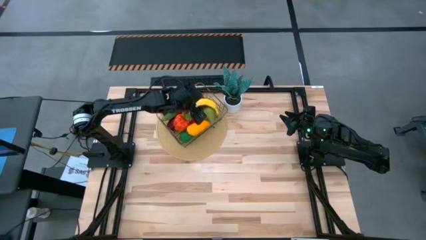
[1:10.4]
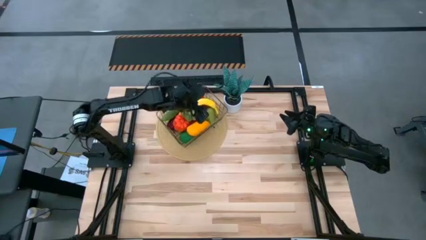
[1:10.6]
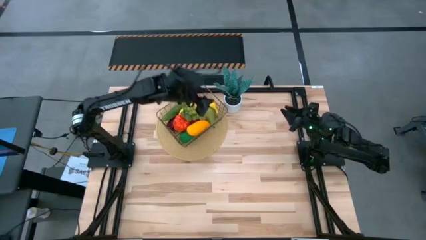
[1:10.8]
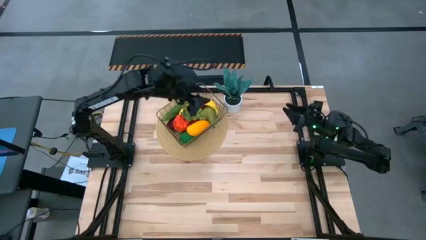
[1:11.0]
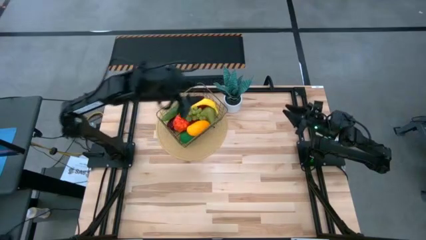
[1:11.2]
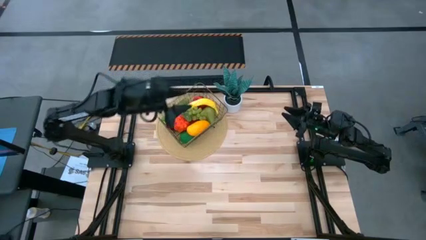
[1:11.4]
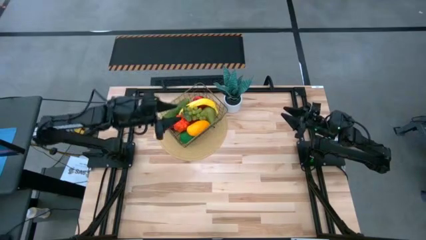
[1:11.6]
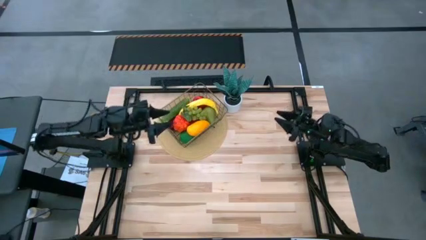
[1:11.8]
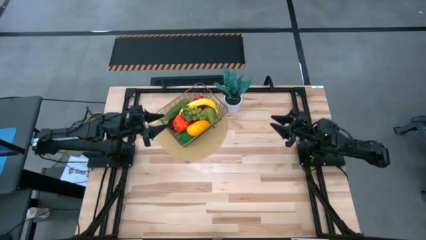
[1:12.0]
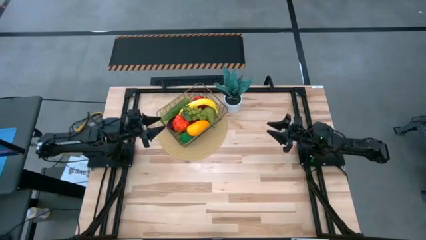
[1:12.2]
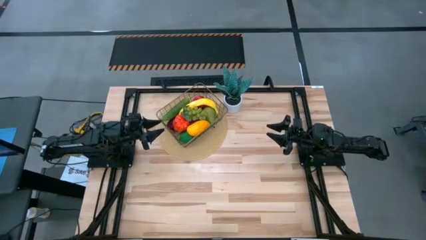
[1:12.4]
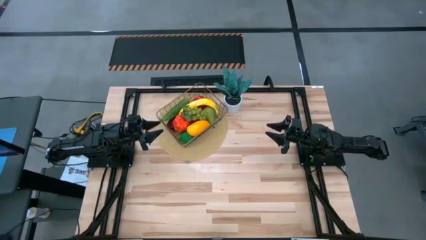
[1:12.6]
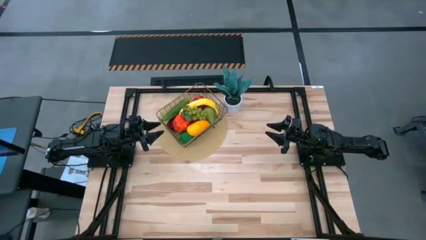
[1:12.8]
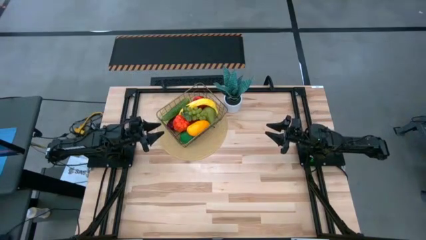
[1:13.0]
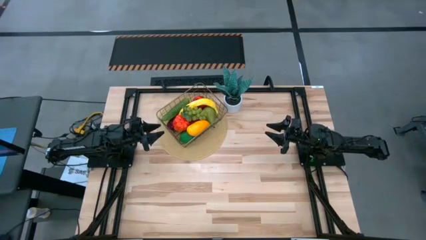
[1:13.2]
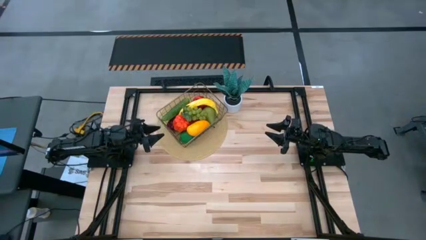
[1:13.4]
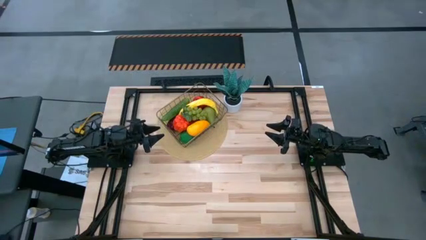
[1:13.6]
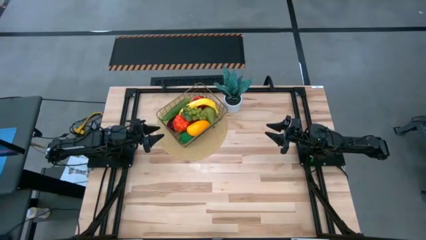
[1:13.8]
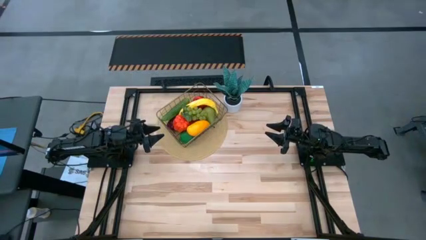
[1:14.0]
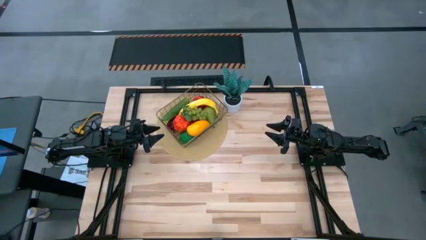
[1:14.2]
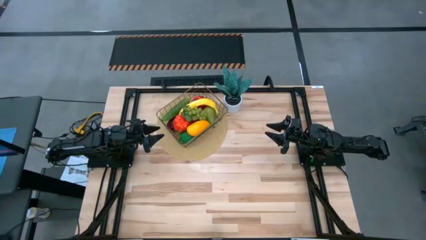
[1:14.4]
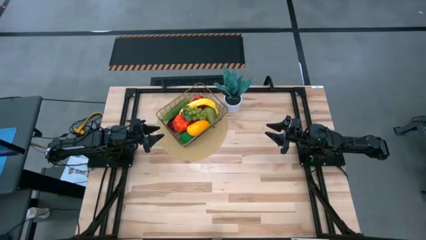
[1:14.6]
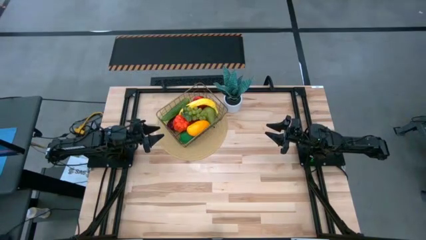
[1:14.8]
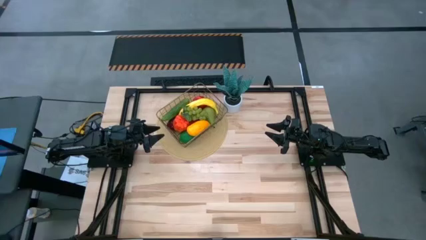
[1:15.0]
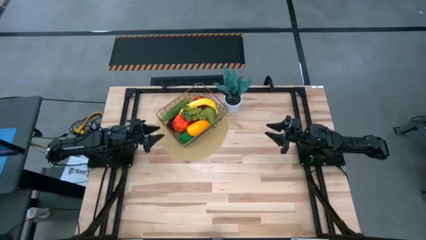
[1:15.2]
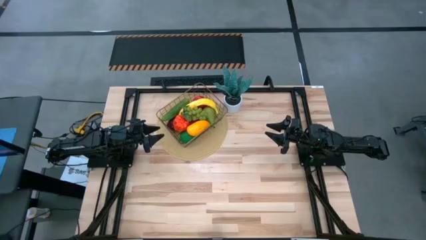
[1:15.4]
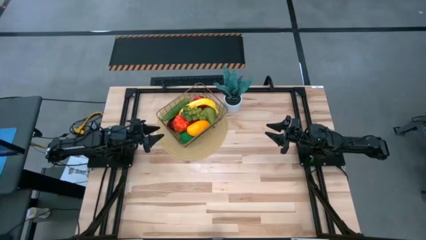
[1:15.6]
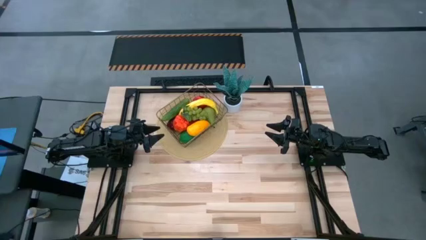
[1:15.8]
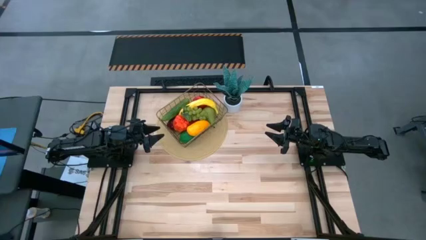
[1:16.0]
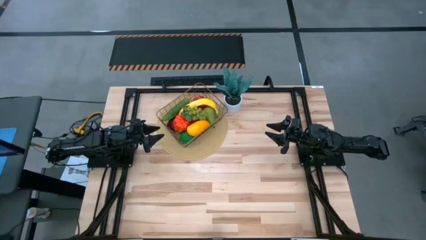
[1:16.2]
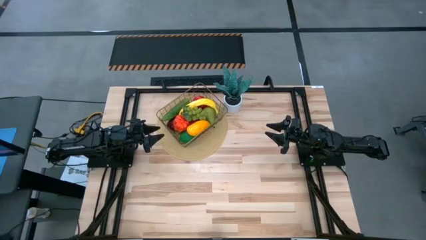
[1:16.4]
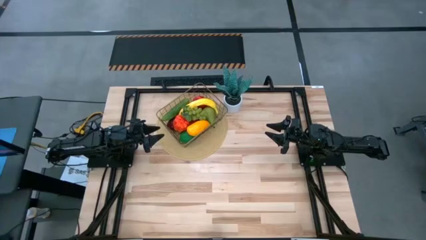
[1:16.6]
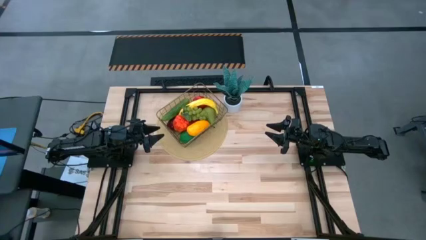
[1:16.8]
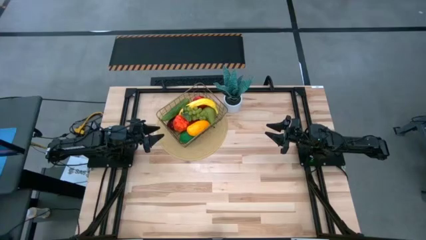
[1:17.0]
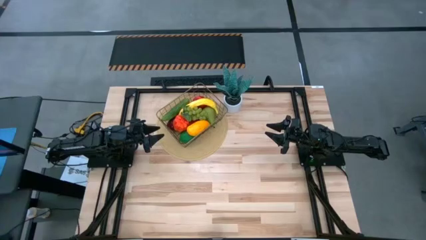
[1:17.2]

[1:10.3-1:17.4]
Task: Build produce basket
Return to Home Position

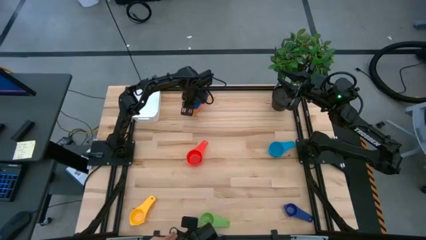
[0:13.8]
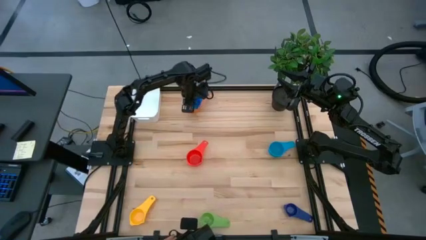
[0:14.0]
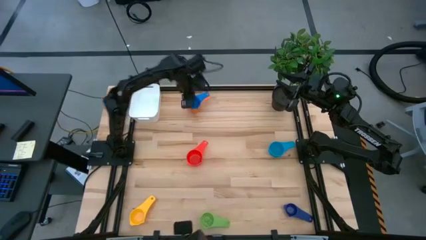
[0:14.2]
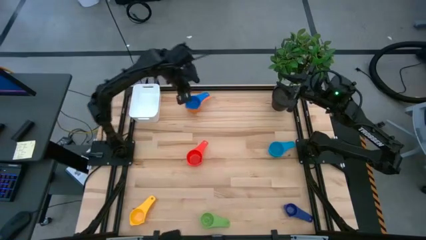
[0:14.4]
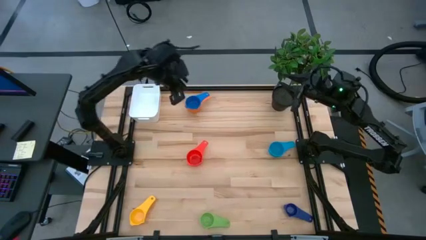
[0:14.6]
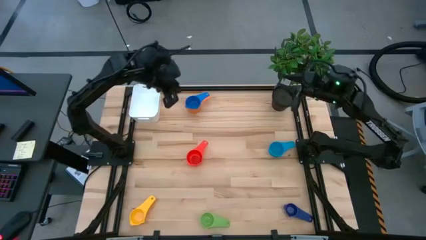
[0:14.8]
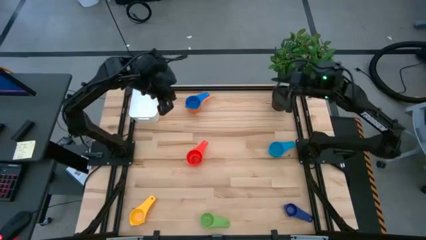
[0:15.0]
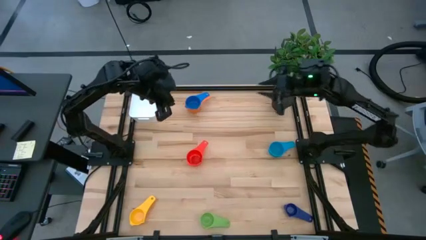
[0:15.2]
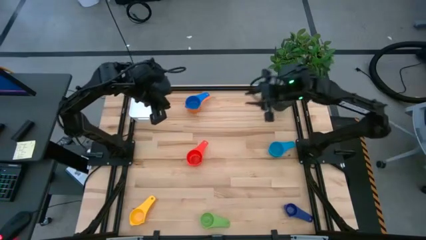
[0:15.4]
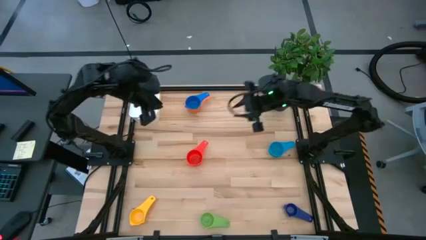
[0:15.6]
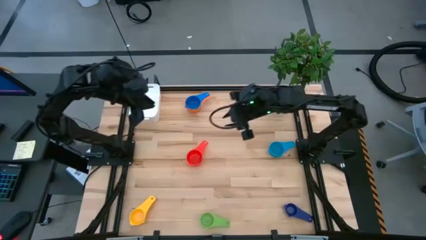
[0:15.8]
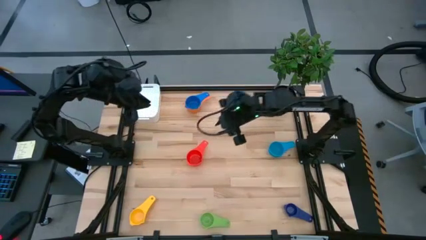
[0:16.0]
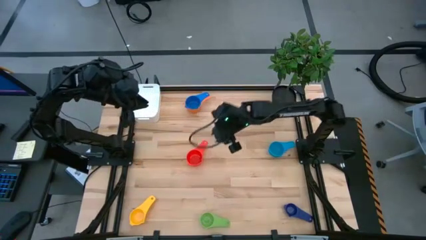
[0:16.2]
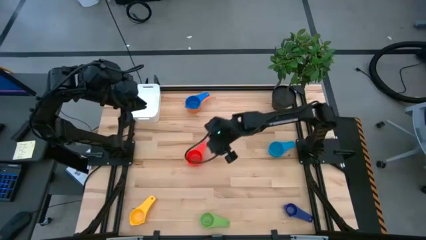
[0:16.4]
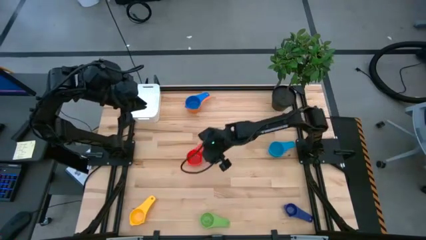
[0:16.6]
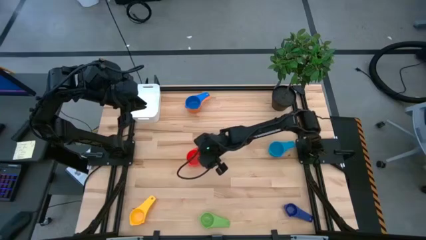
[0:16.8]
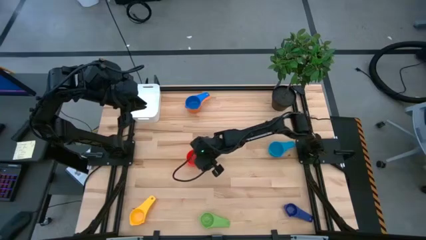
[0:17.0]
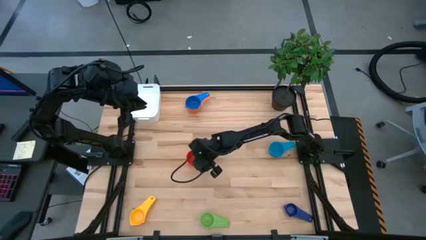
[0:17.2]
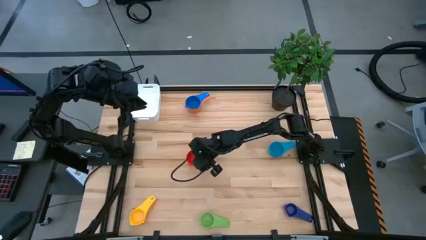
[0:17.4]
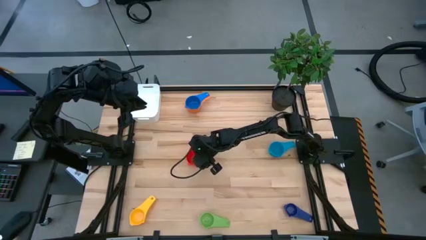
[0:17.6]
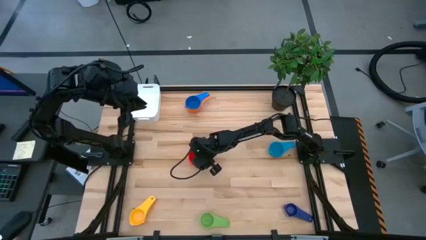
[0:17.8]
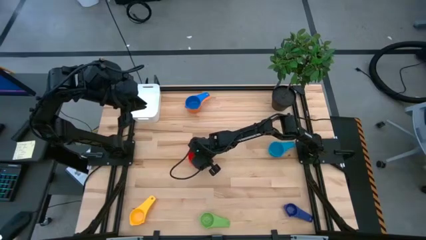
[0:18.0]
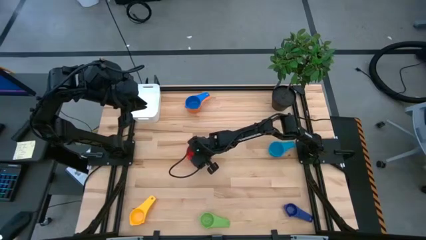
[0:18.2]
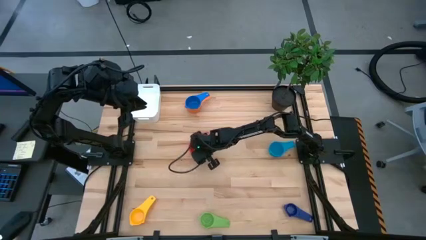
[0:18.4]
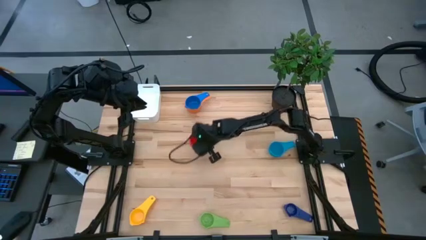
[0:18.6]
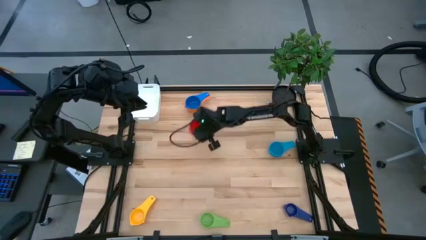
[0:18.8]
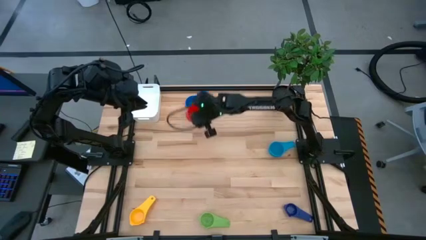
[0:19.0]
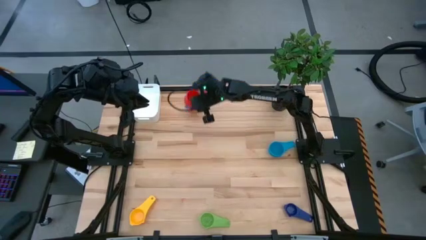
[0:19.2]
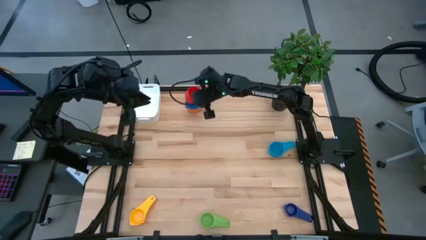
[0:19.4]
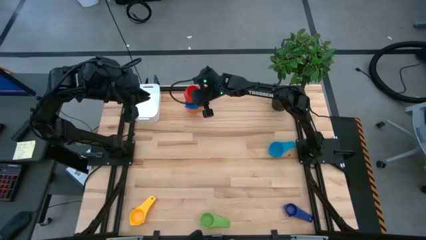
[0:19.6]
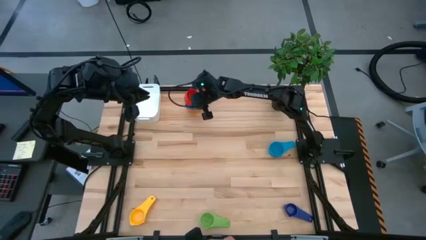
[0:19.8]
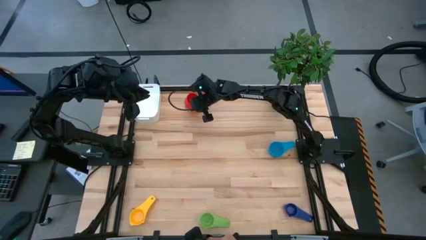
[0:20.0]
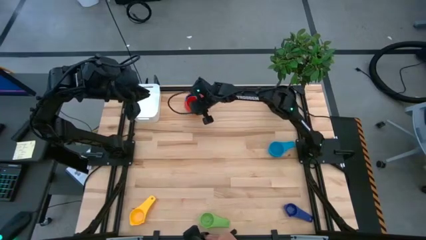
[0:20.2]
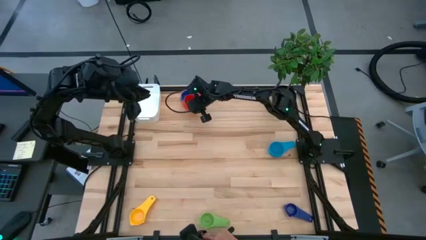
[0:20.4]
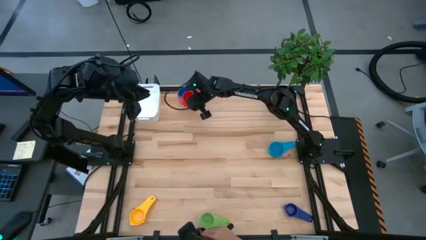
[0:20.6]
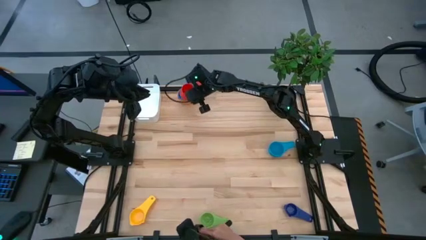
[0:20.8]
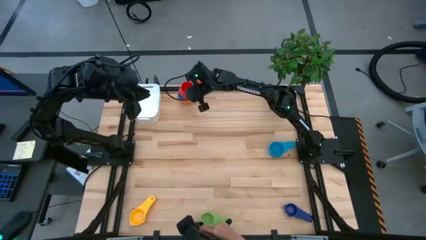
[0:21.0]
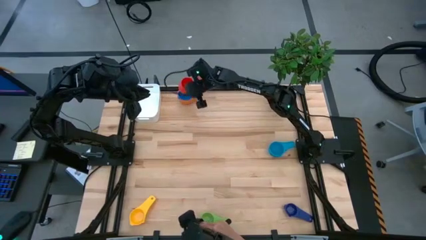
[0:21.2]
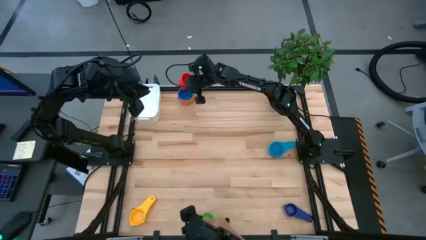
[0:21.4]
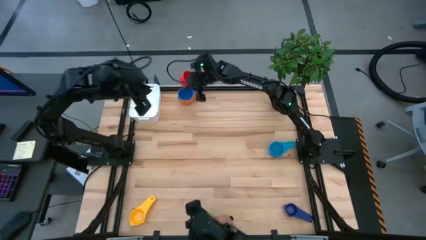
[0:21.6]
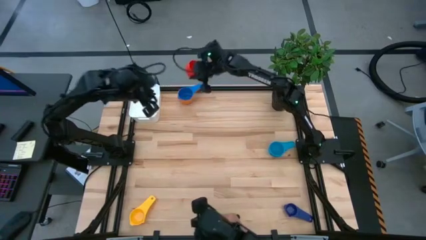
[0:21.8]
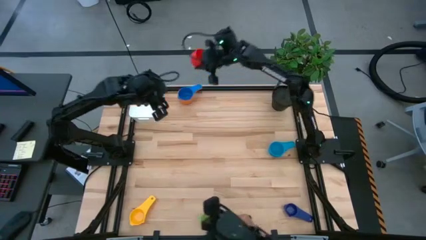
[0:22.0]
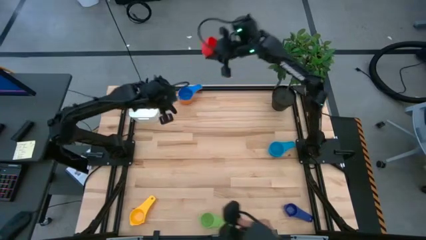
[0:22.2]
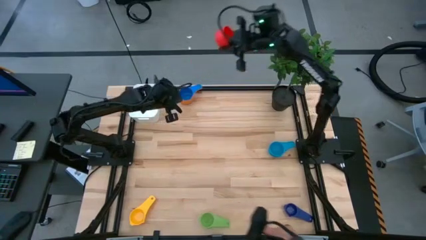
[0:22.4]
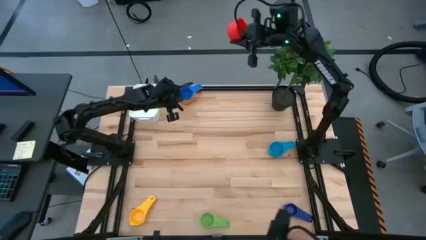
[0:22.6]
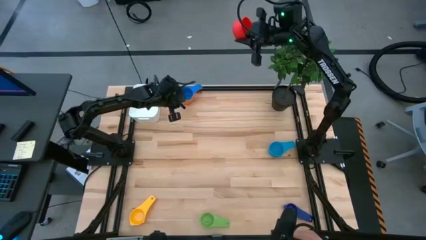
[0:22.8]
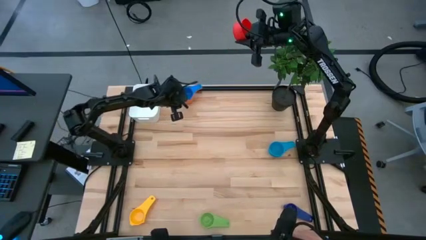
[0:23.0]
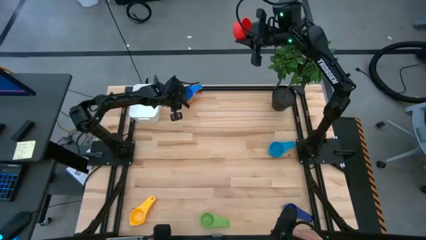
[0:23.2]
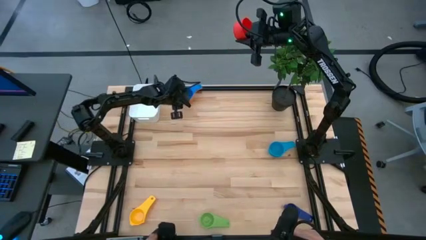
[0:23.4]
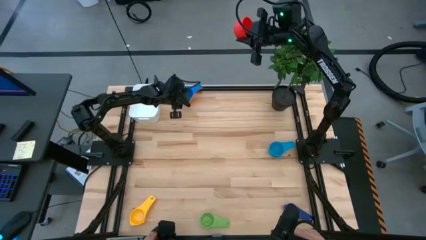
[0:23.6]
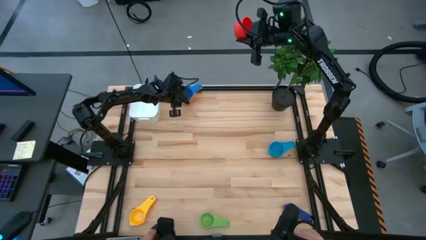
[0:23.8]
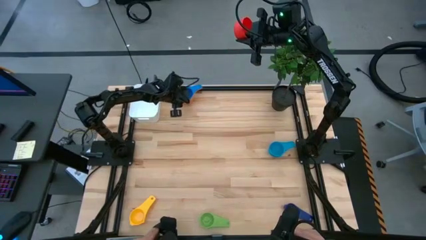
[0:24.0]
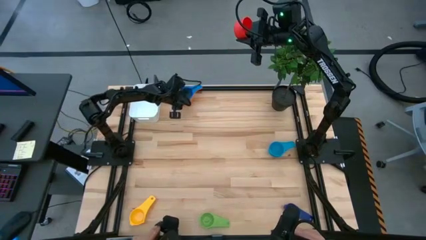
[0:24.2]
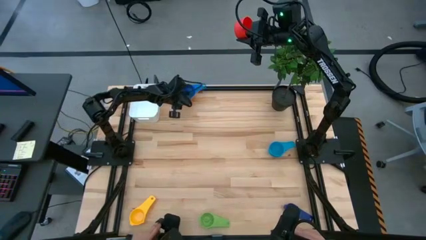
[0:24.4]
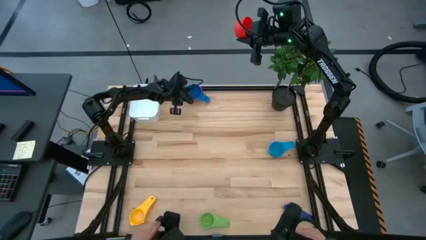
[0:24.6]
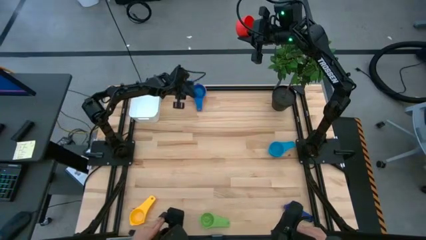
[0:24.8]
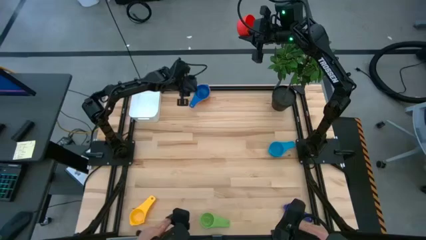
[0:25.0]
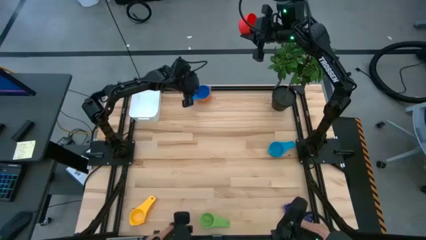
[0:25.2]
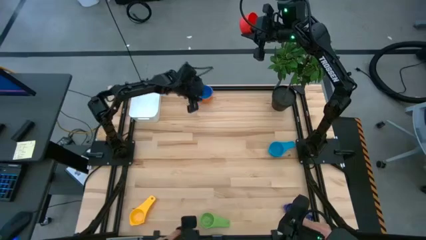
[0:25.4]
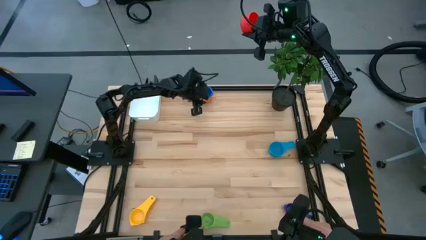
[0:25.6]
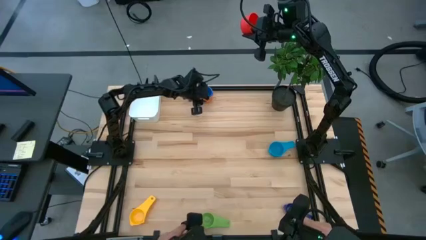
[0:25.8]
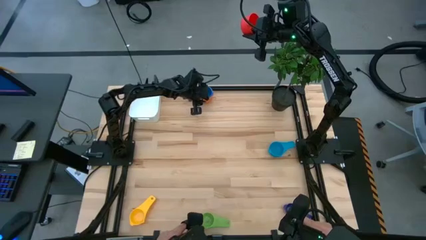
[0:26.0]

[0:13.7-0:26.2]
Task: Nest measuring cups in basket
Stack the red measuring cup on top of the blue measuring cup
